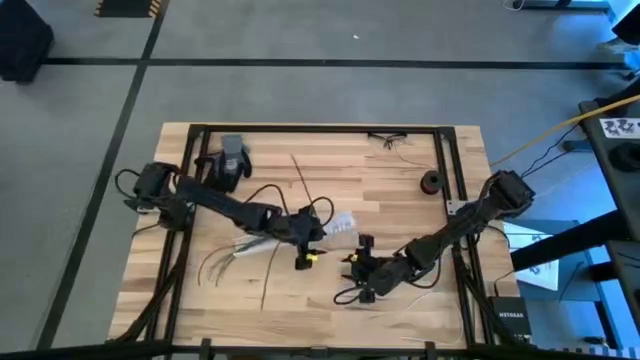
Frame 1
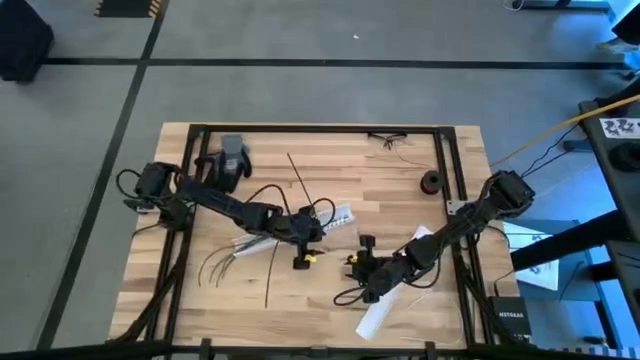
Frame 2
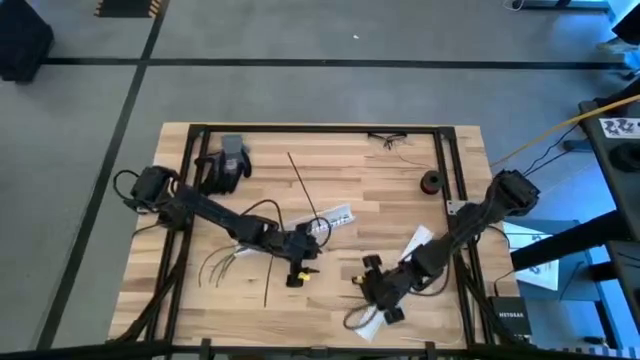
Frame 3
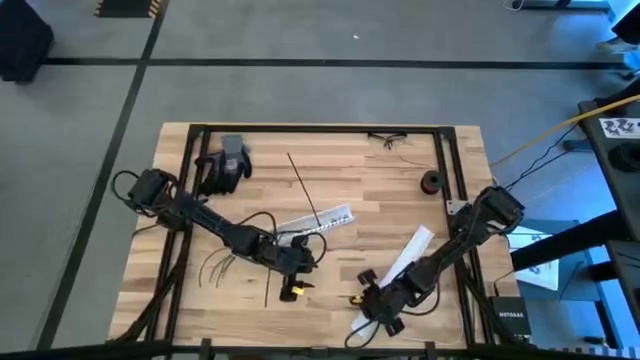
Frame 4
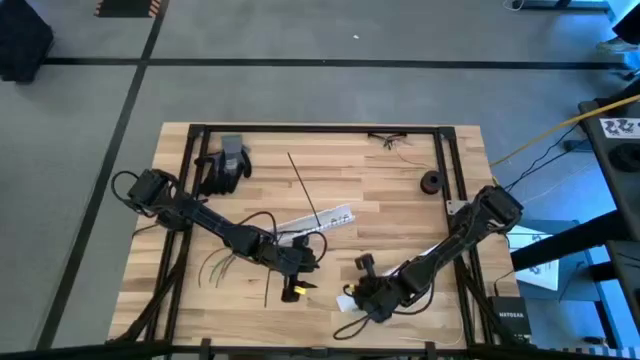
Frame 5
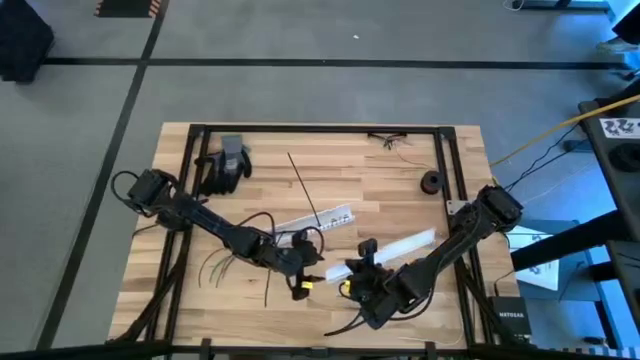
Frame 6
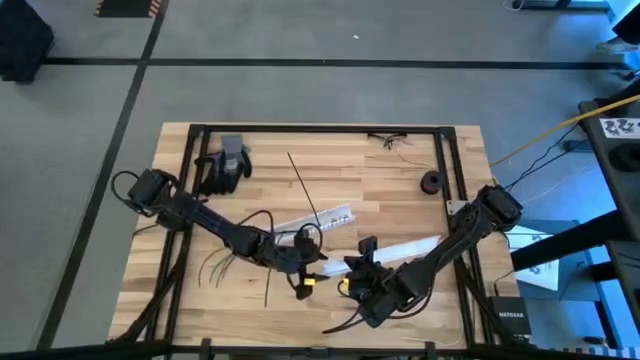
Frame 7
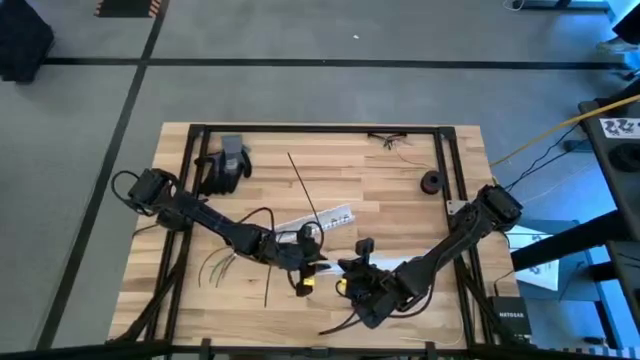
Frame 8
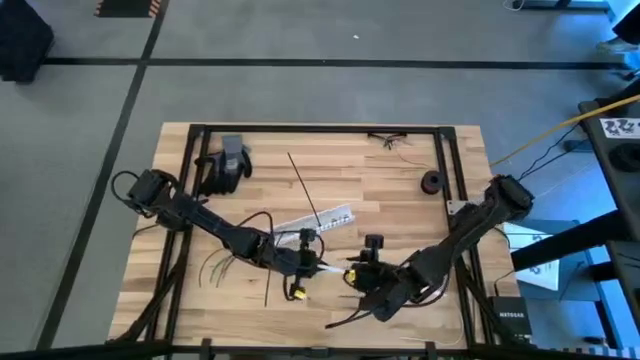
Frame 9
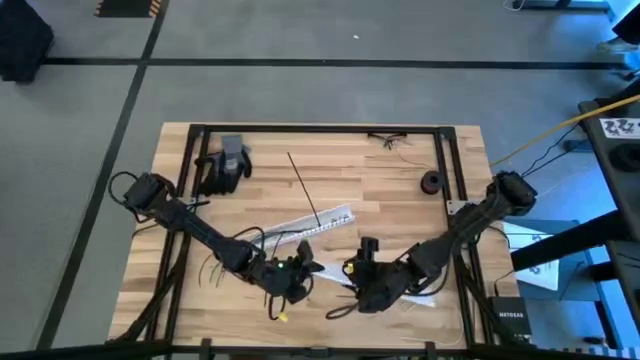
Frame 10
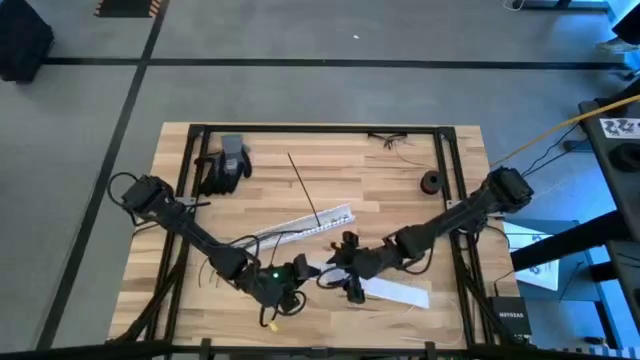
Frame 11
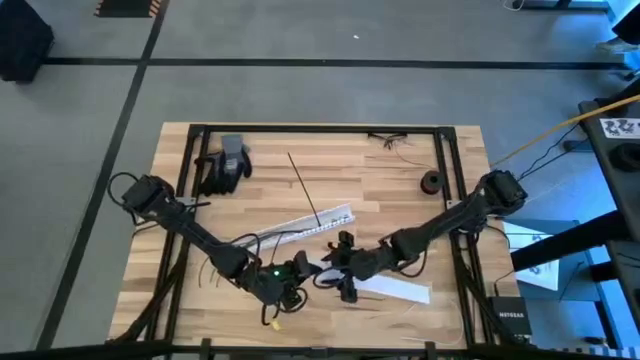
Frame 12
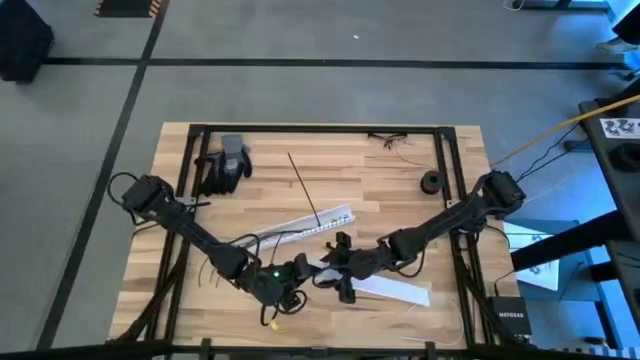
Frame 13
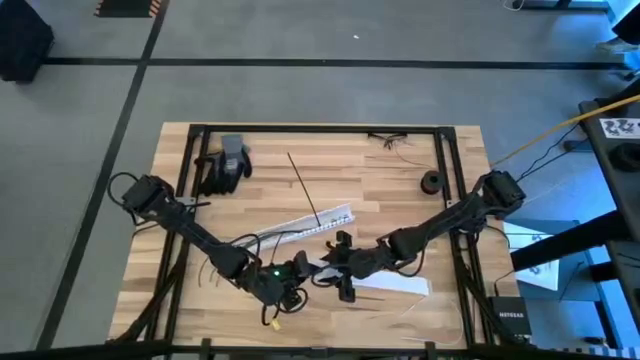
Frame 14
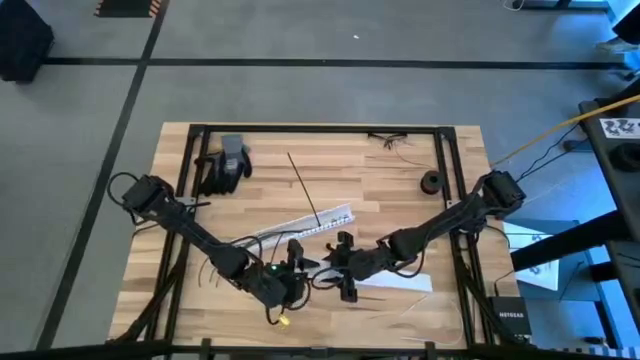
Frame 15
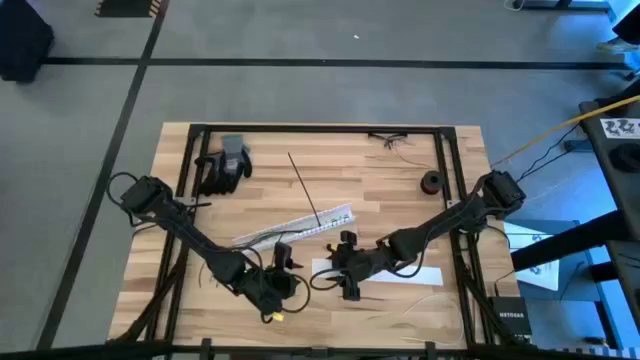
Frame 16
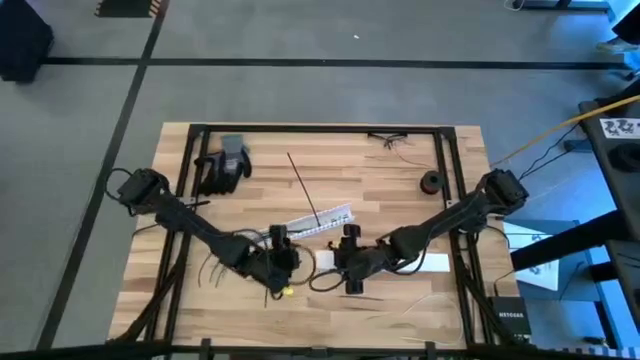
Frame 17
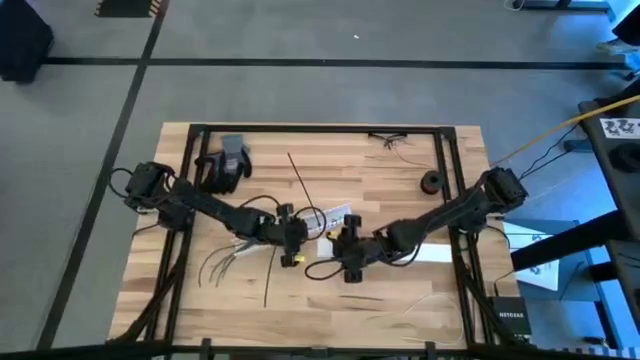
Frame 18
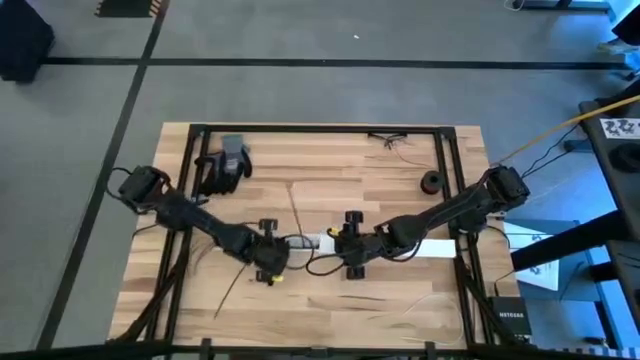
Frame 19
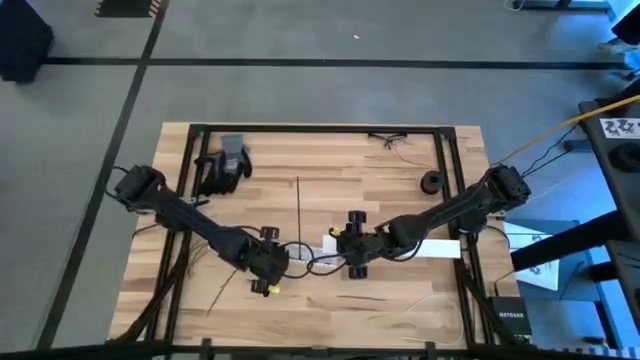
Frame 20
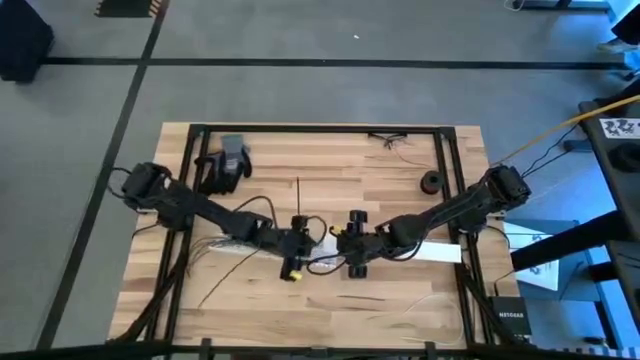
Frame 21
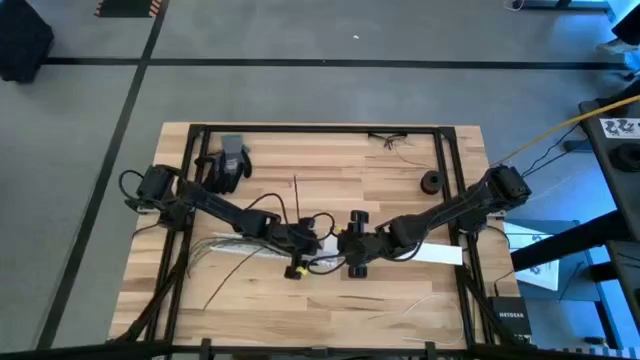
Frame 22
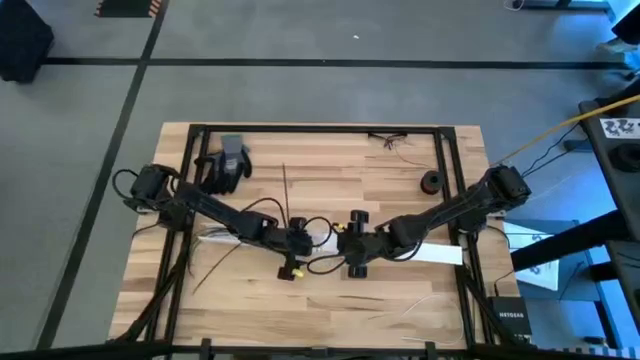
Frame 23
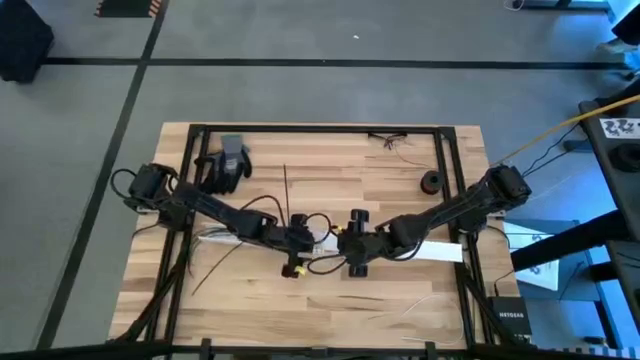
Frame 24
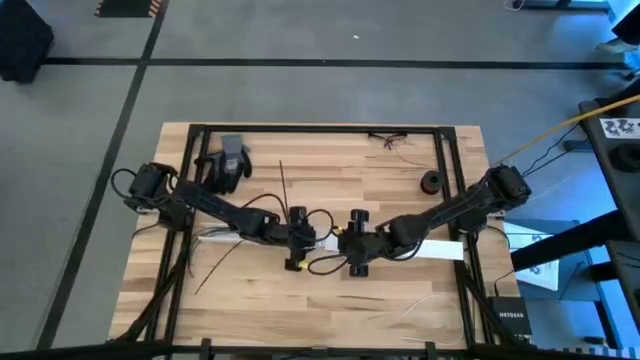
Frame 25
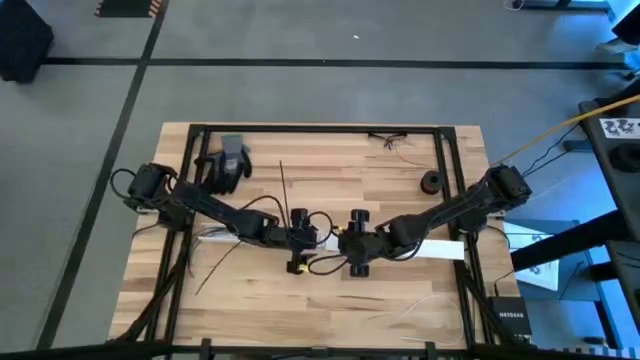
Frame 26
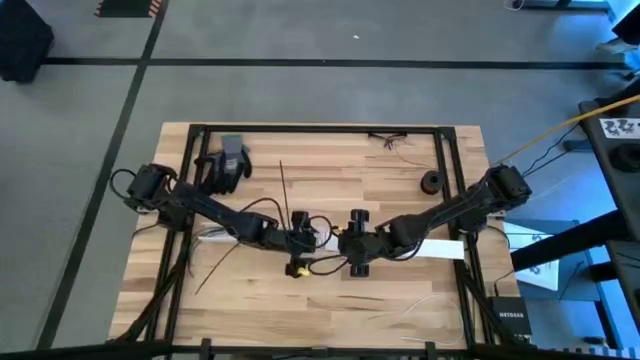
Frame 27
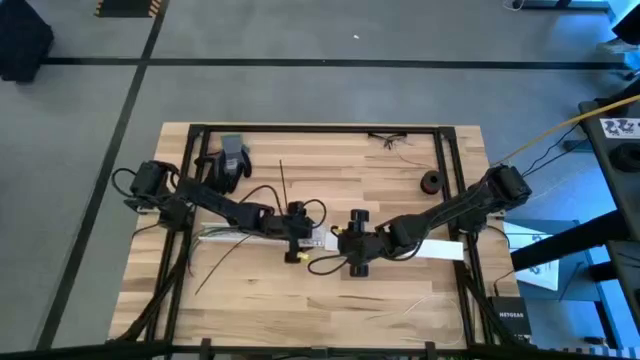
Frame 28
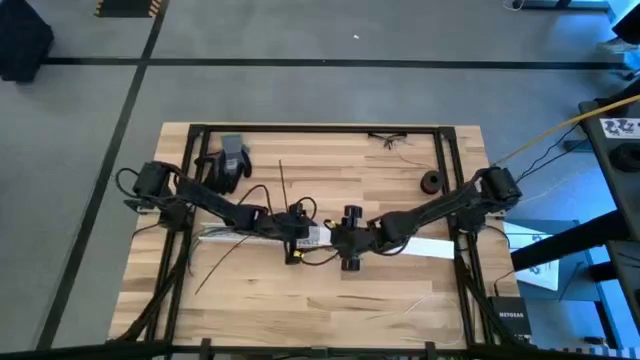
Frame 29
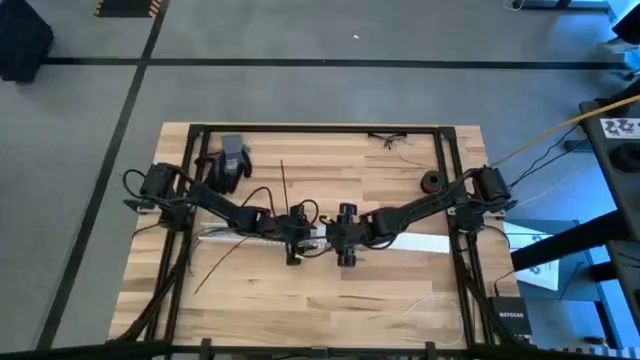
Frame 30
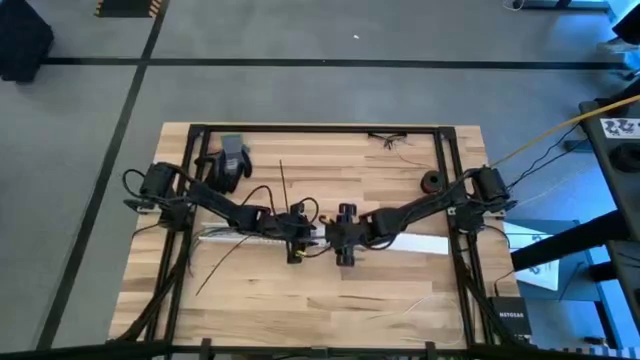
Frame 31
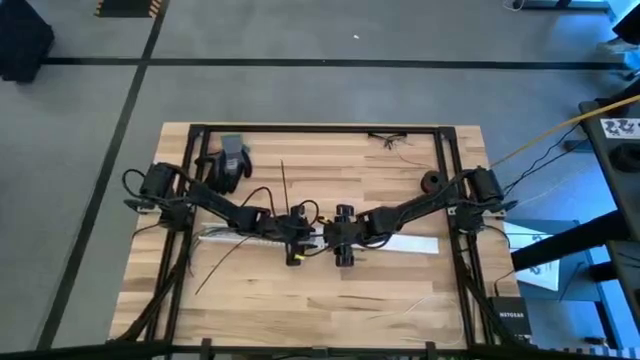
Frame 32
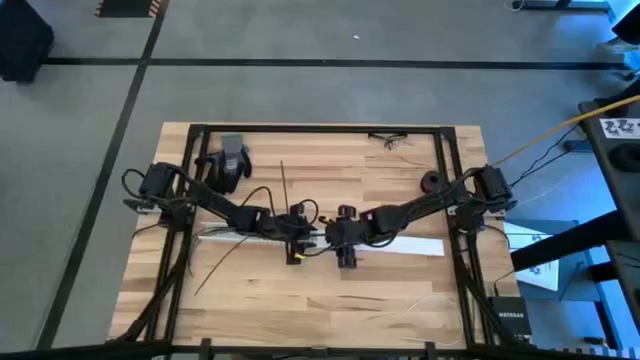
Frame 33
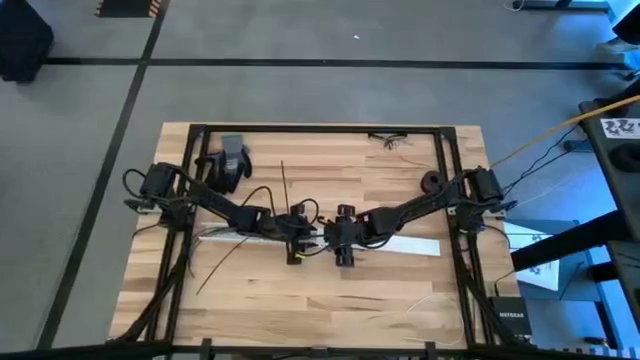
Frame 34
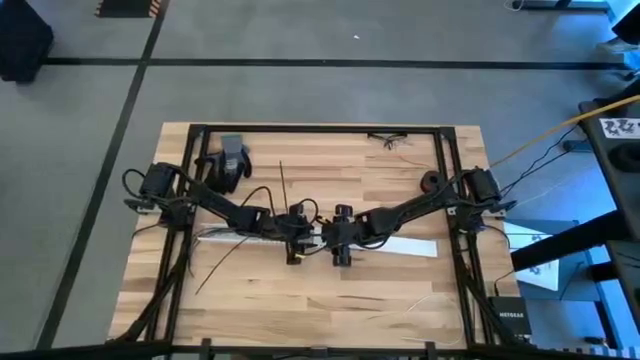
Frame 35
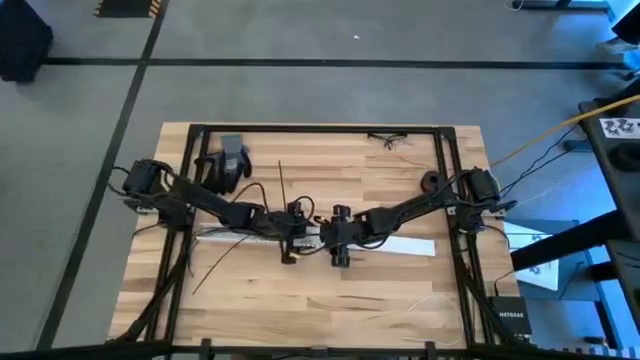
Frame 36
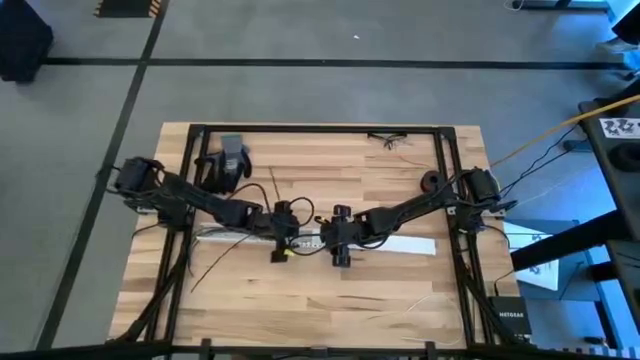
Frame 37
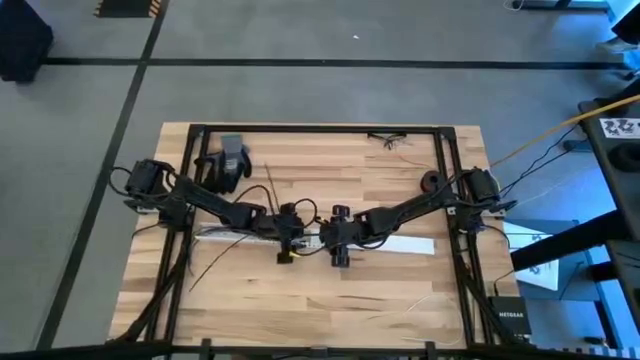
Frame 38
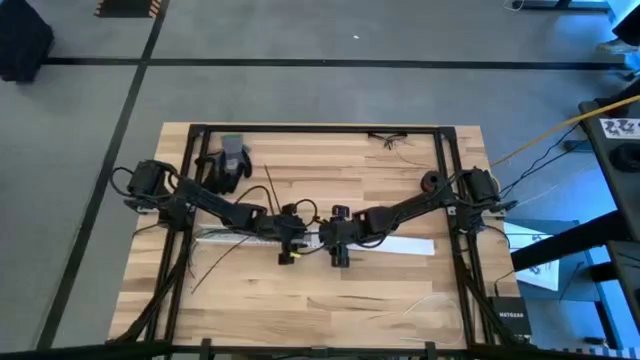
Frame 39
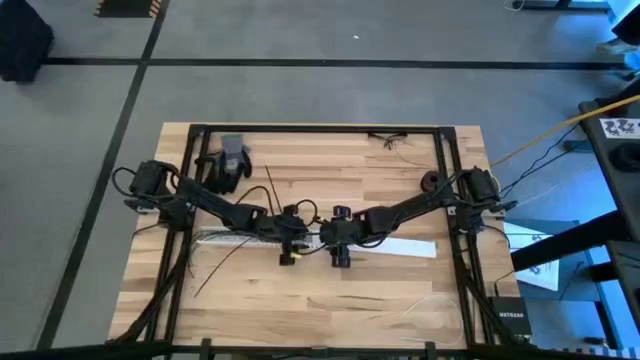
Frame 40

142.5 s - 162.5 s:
Task: Ziptie cables
Close the cable duct

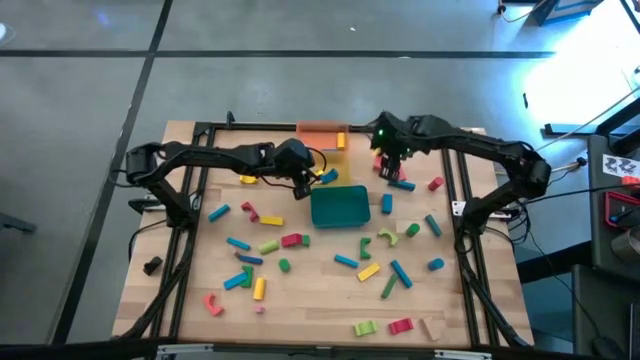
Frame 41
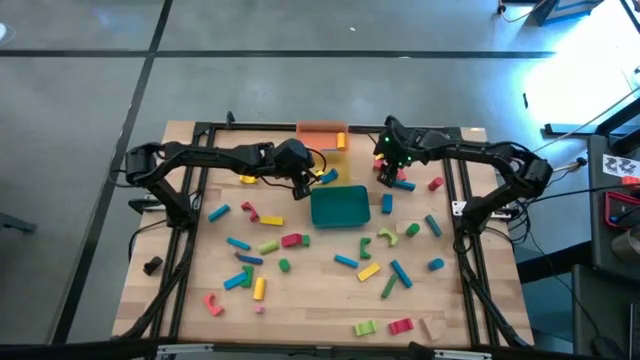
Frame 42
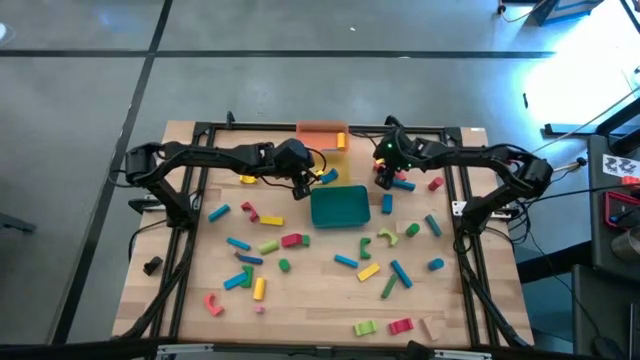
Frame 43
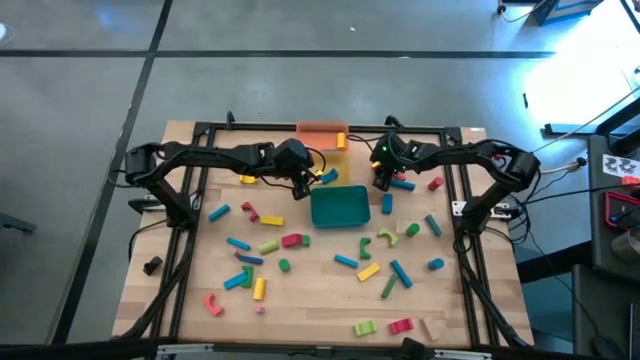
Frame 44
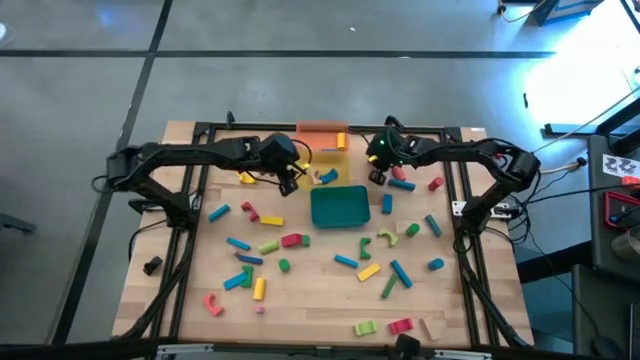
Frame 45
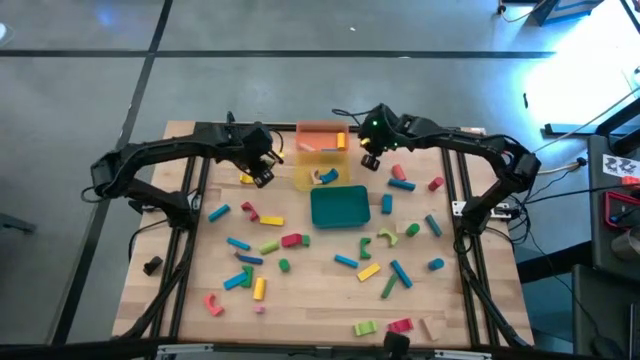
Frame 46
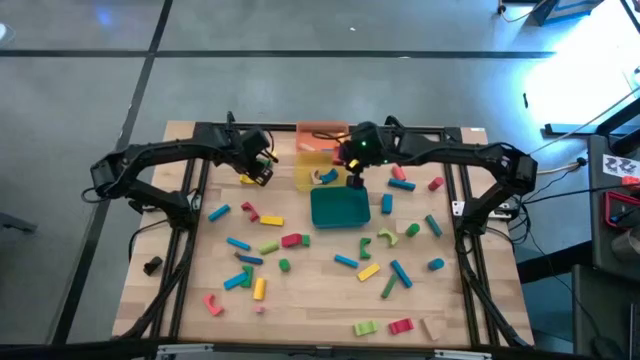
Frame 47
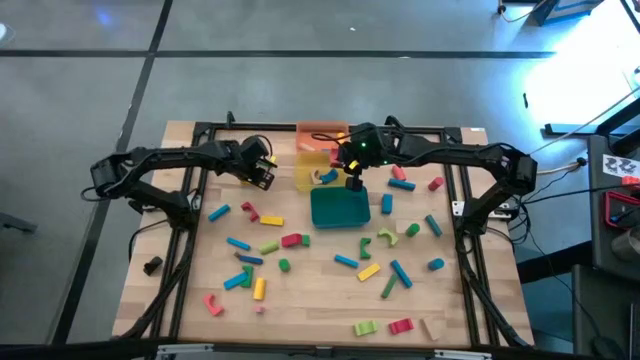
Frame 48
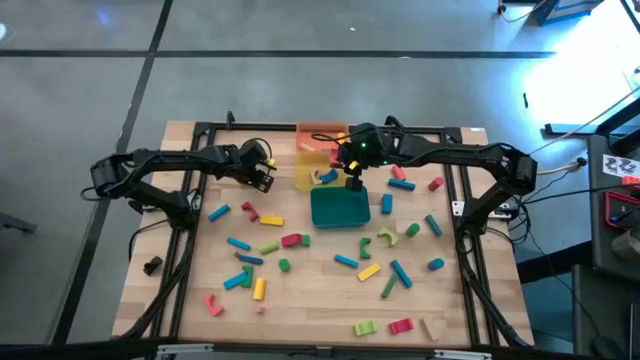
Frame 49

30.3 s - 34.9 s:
Task: Sort blocks by size
Put the orange arch block into the yellow bin
